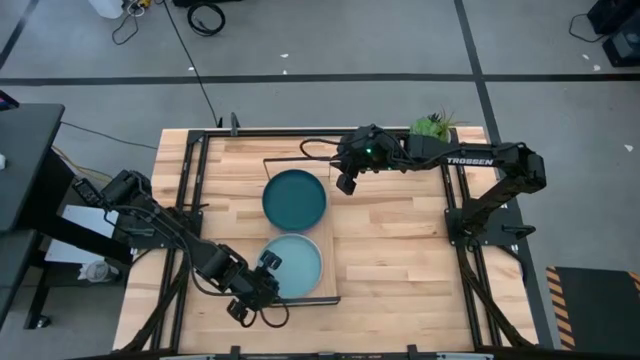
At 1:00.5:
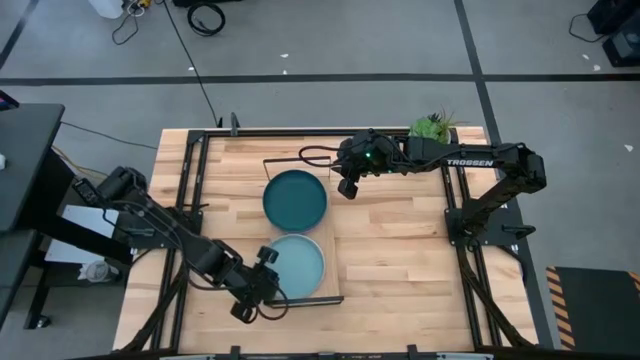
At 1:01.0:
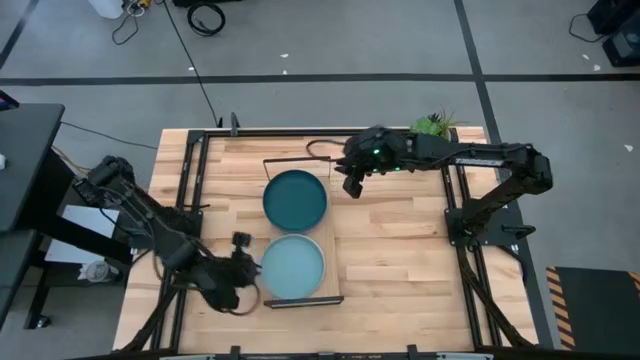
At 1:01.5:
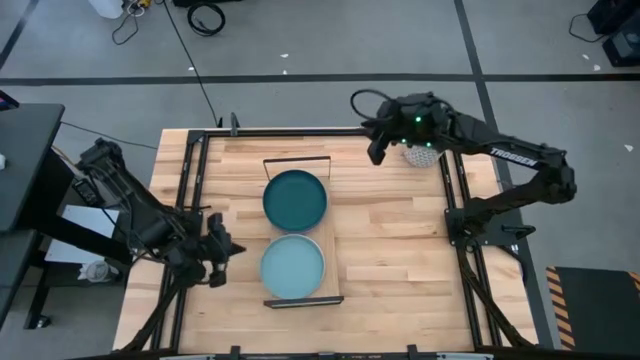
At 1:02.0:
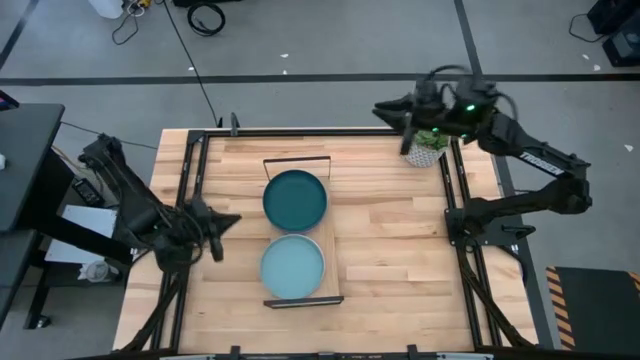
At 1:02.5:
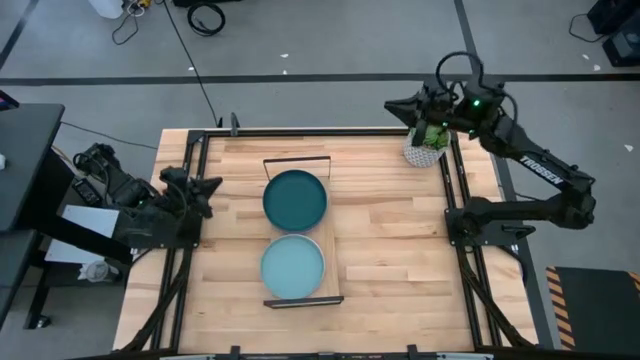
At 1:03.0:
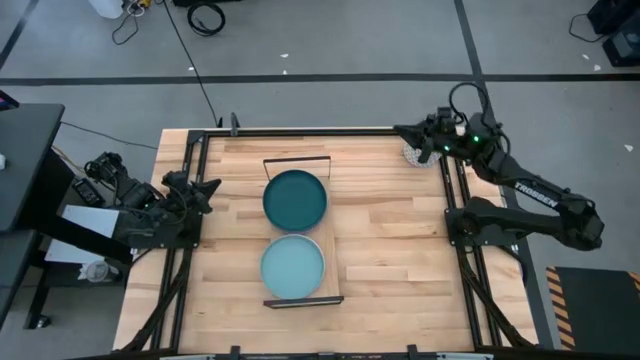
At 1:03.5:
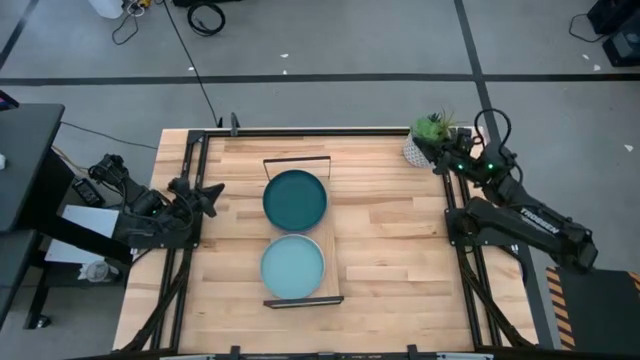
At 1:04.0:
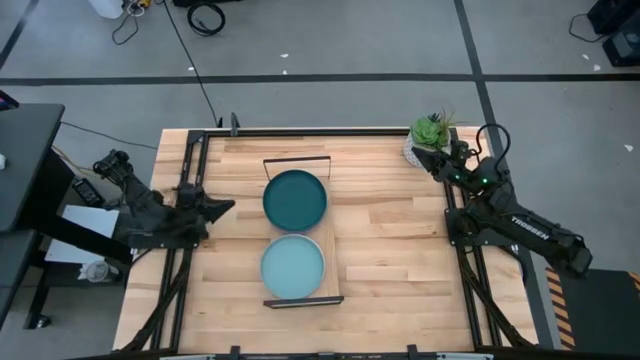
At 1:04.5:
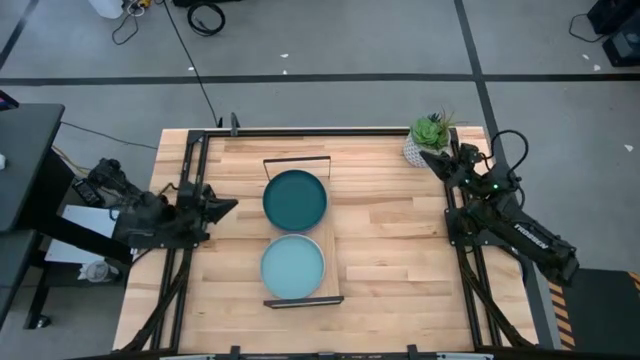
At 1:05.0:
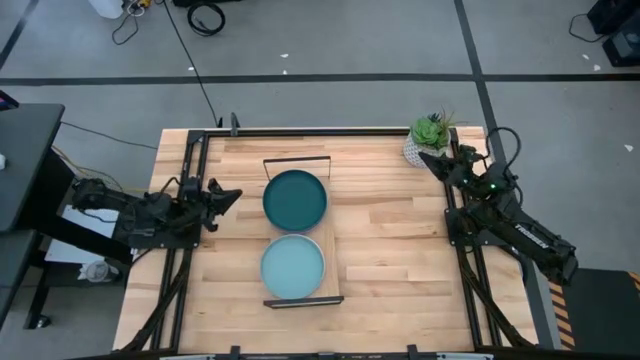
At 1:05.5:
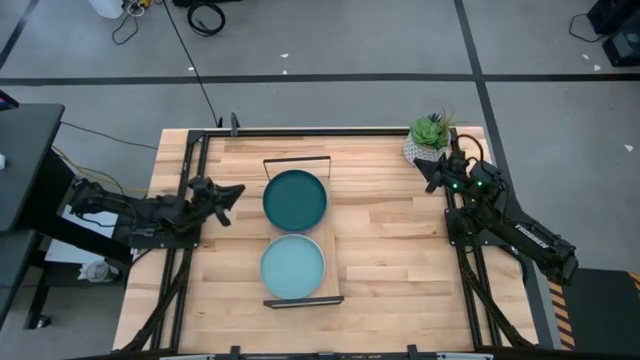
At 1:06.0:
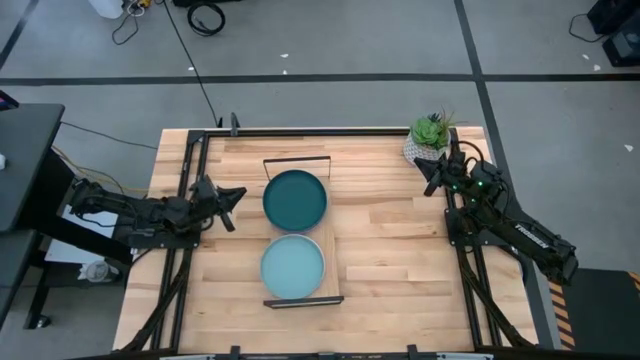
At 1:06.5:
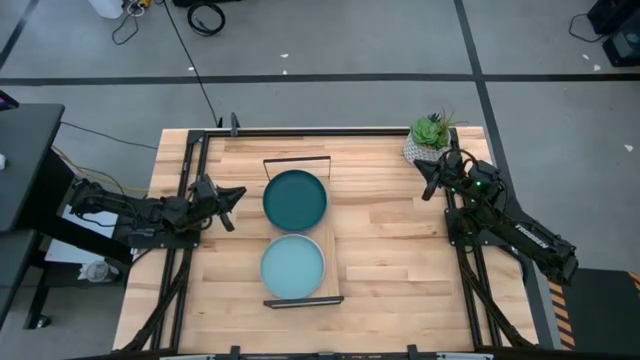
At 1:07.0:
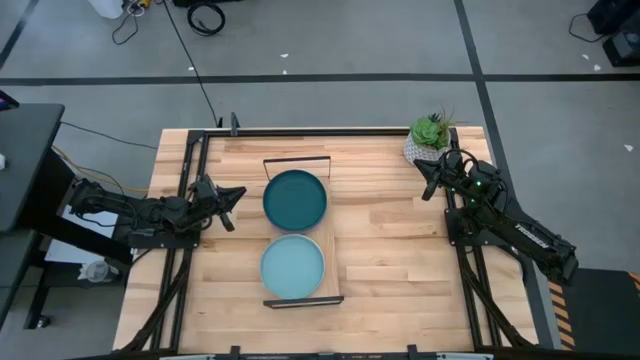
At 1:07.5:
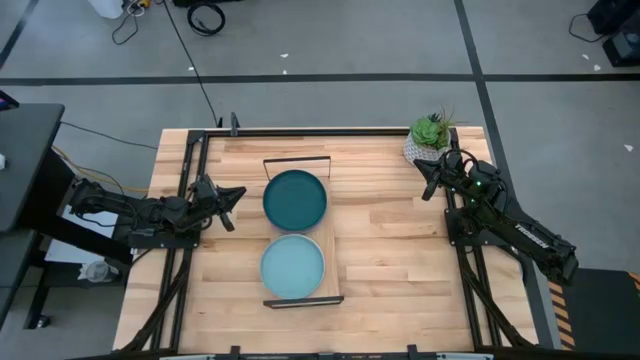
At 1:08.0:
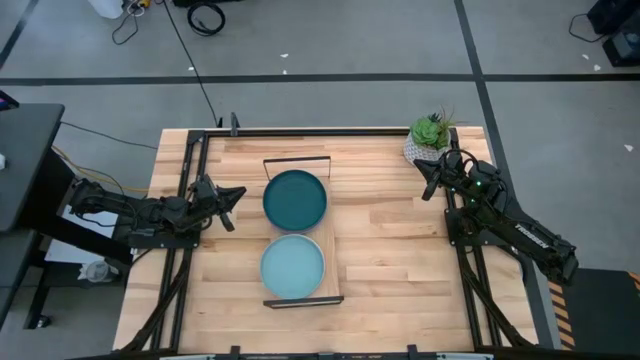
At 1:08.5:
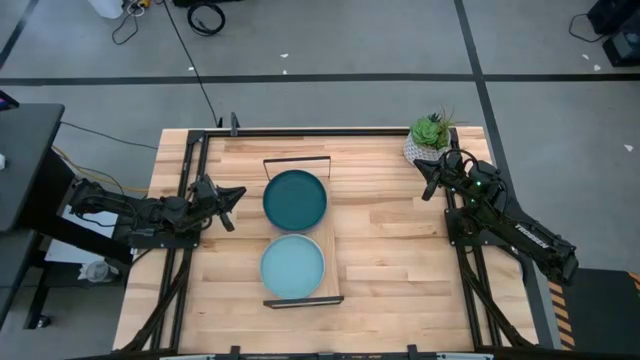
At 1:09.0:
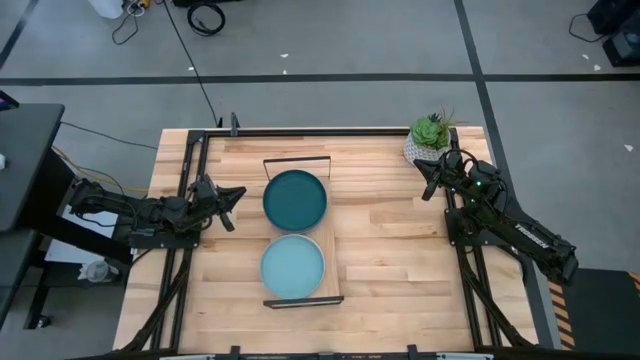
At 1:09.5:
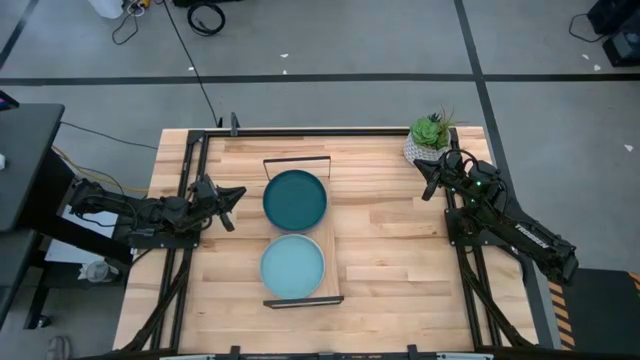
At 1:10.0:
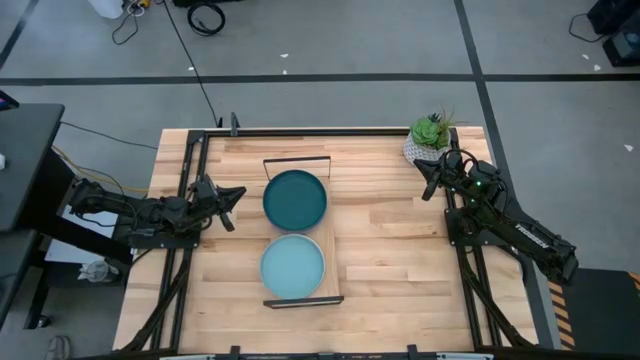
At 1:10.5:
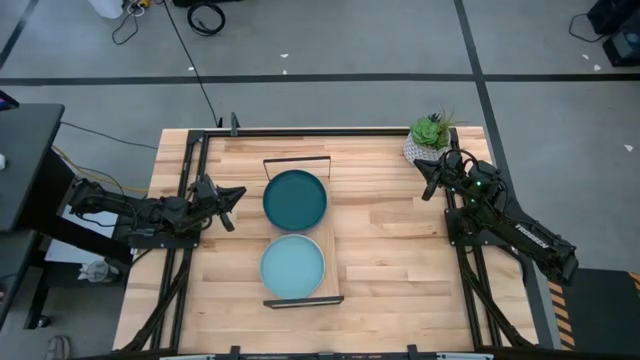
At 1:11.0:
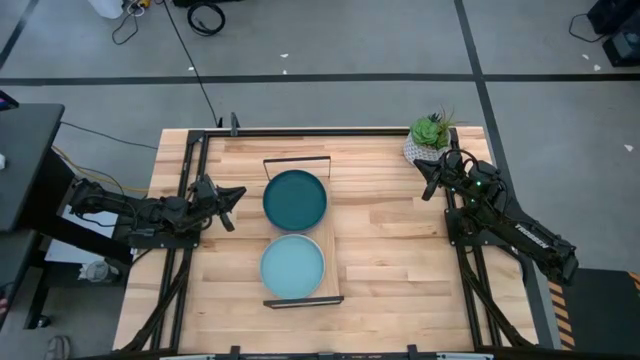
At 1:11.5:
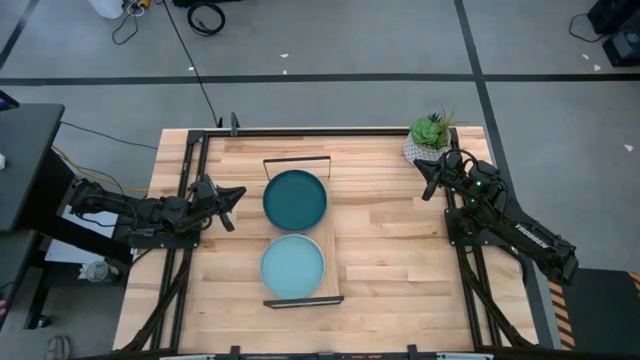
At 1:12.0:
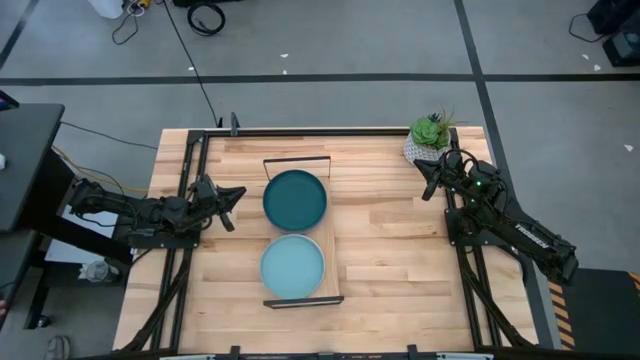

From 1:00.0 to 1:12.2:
Task: Place and stack plates onto a shelf
Return to Home Position

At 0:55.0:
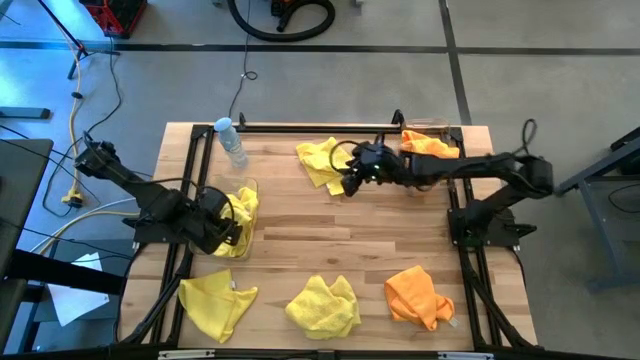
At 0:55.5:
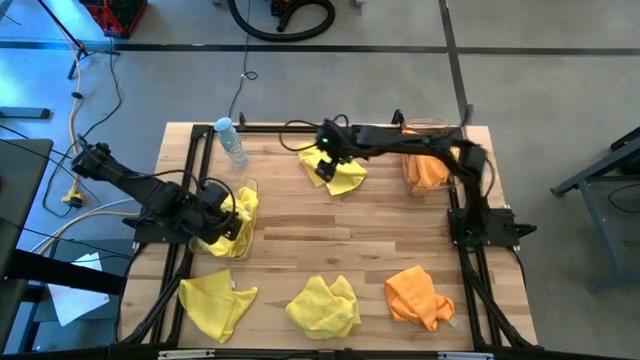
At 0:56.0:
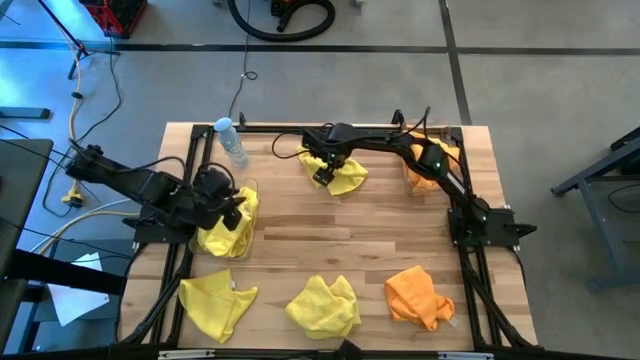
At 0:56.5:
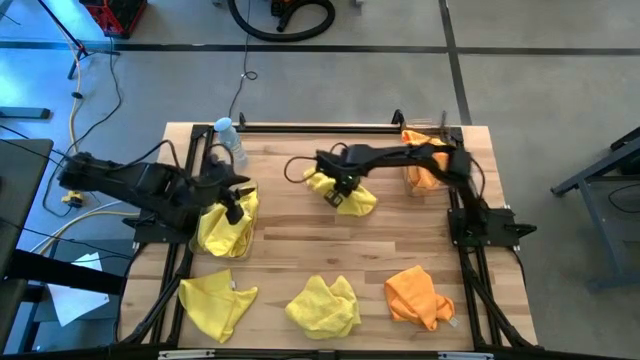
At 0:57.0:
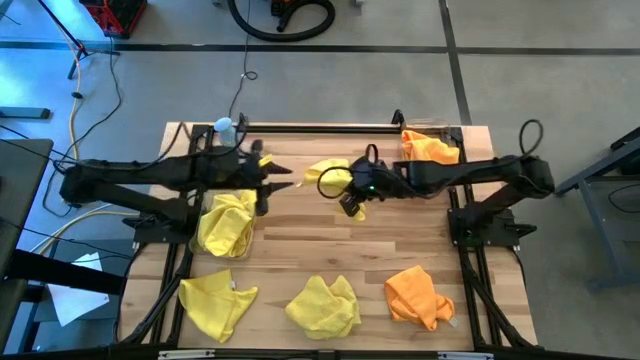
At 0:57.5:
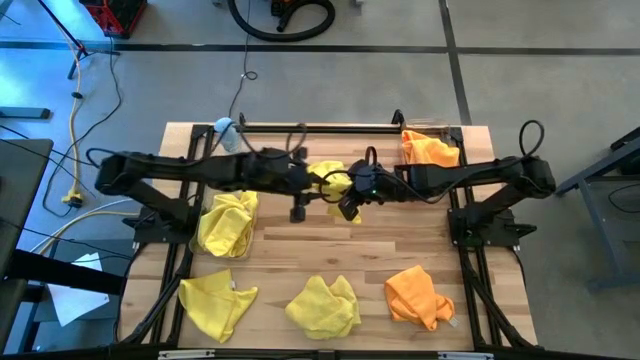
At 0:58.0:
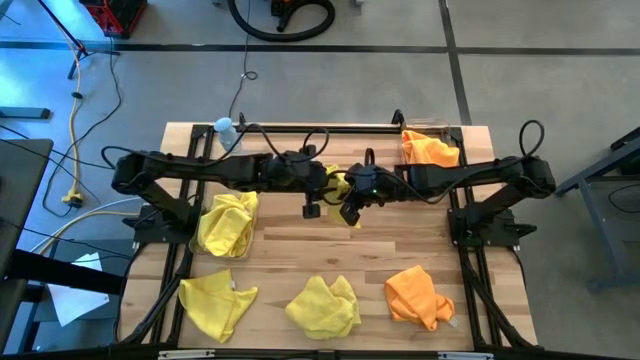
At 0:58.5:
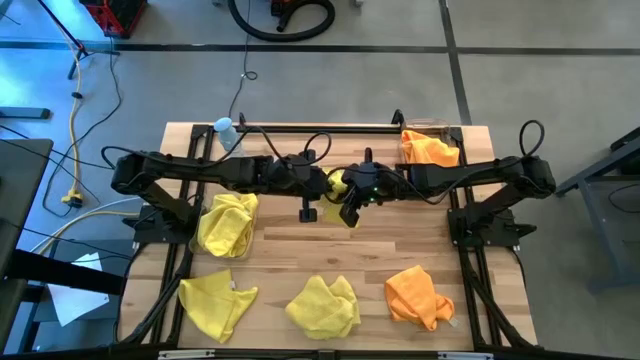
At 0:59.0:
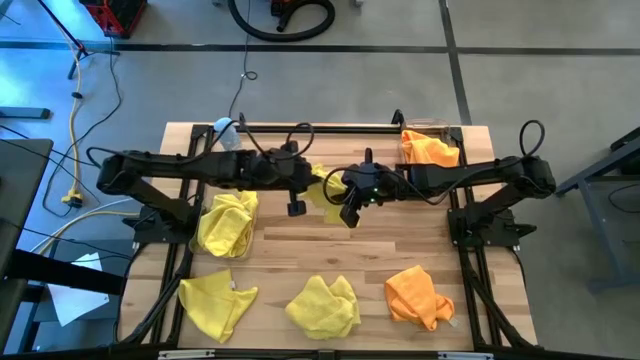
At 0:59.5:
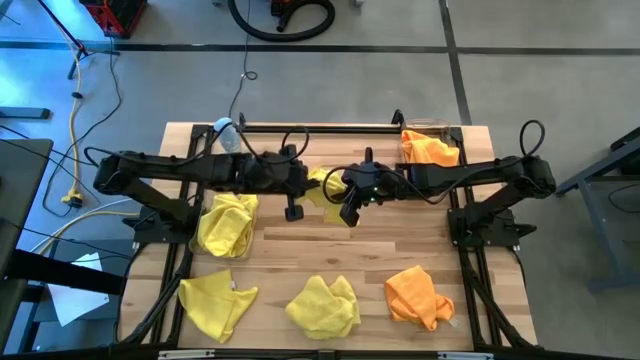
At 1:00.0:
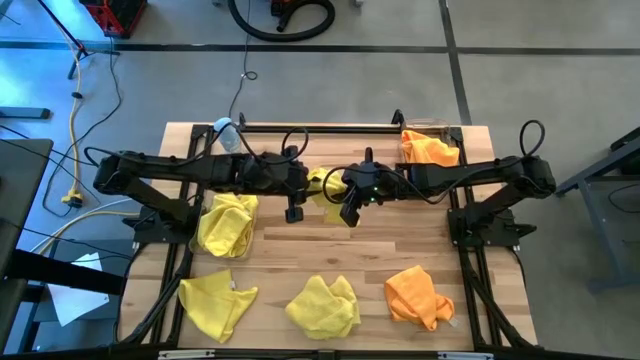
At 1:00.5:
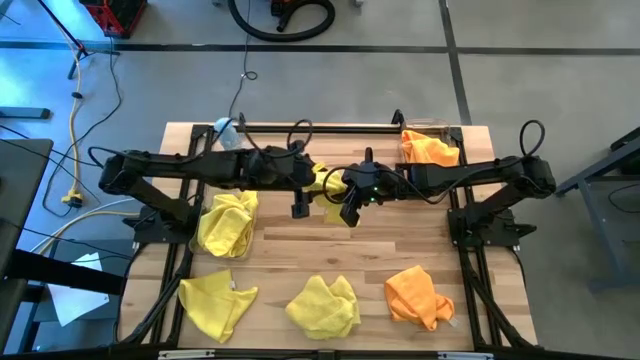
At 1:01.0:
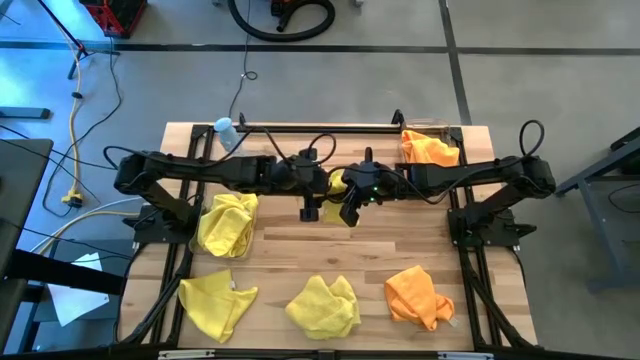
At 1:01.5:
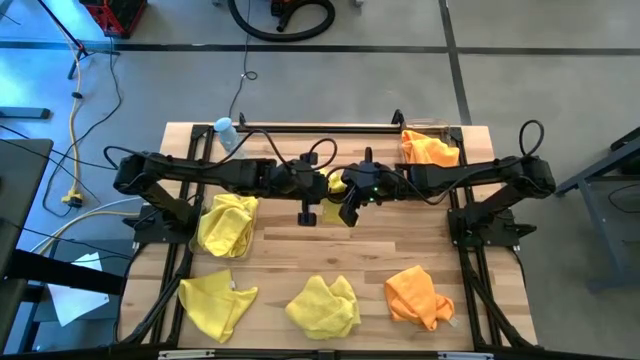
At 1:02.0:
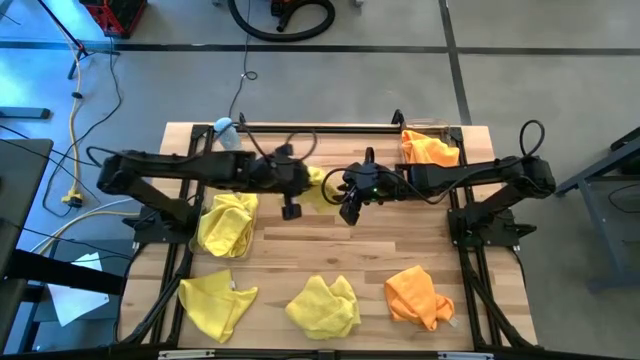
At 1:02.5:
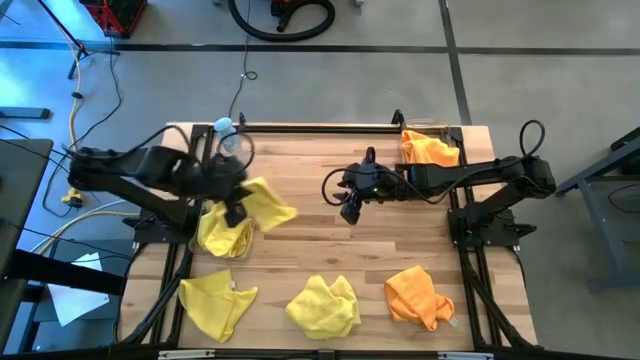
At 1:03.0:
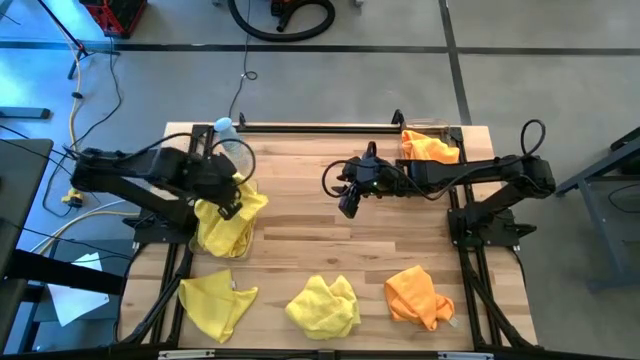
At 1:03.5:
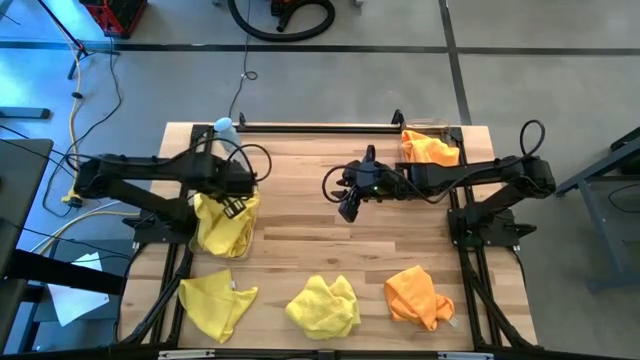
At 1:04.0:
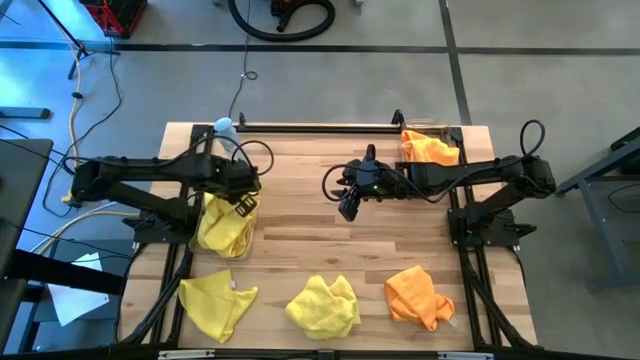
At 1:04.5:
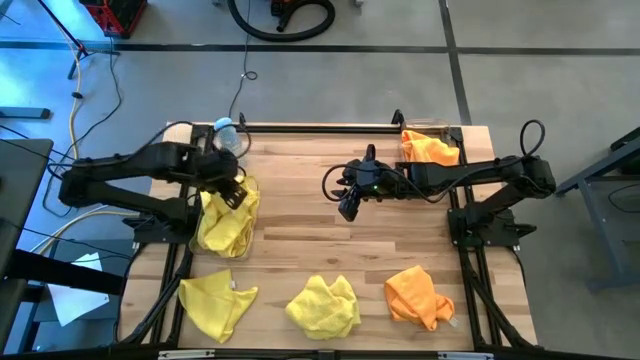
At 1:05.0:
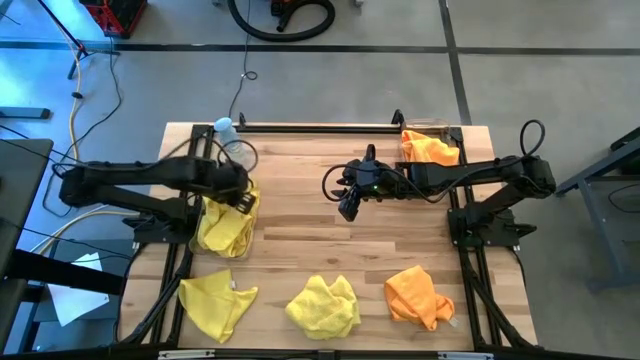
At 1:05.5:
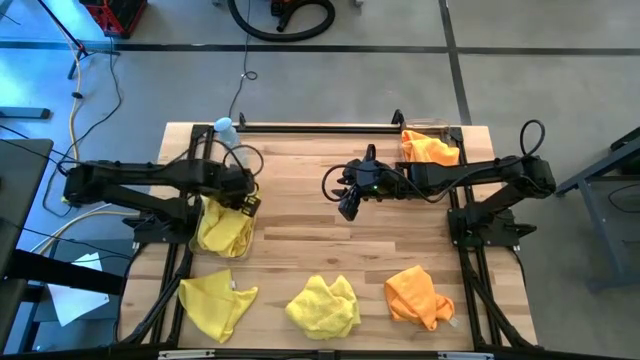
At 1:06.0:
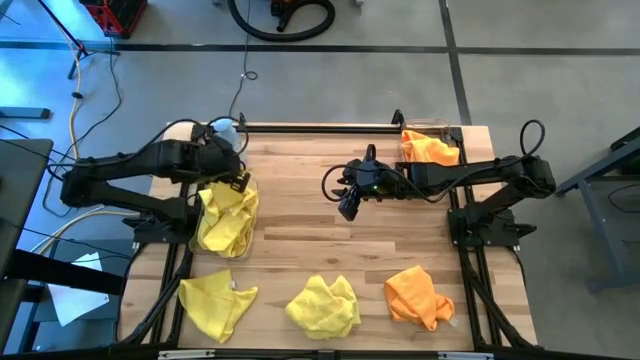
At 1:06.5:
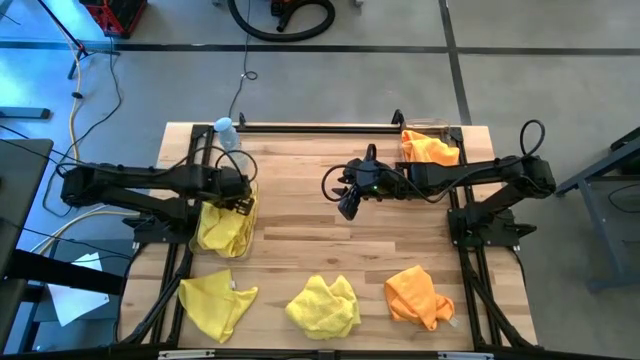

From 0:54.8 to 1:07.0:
Task: Sort microfiber towel by color & place in baskets
Put the yellow microfiber cloth into the left transparent bin
